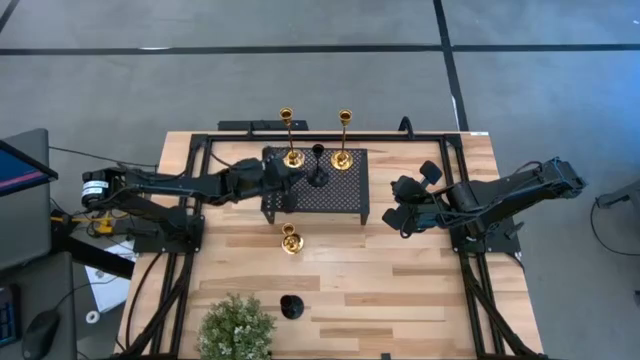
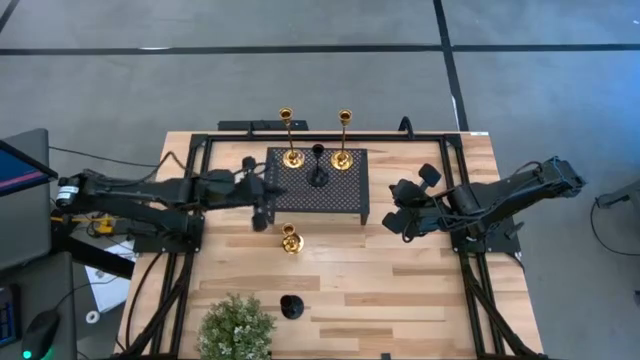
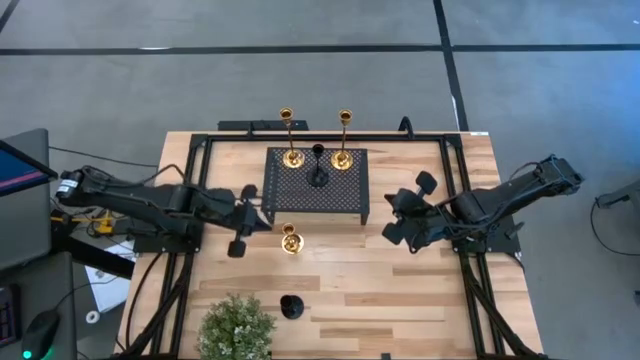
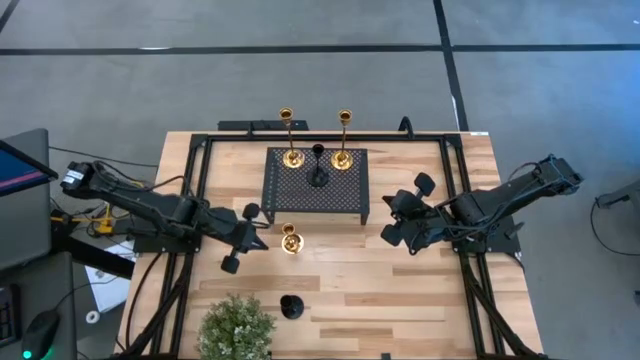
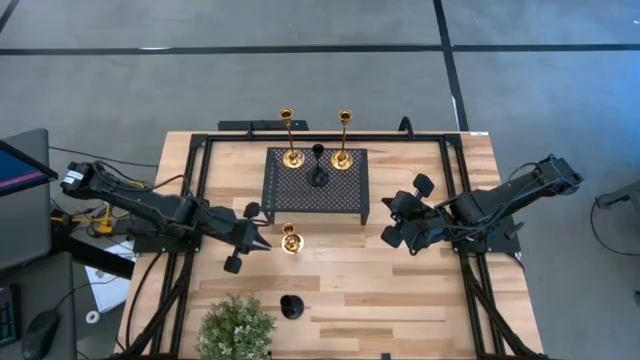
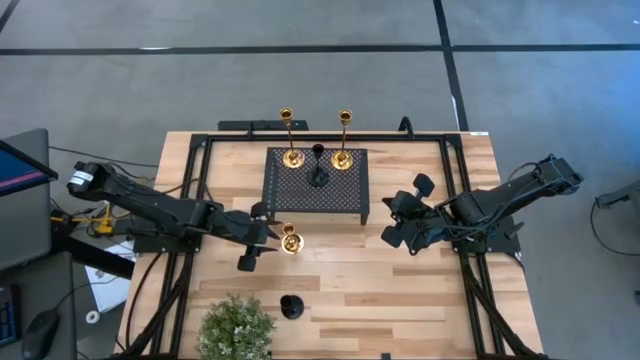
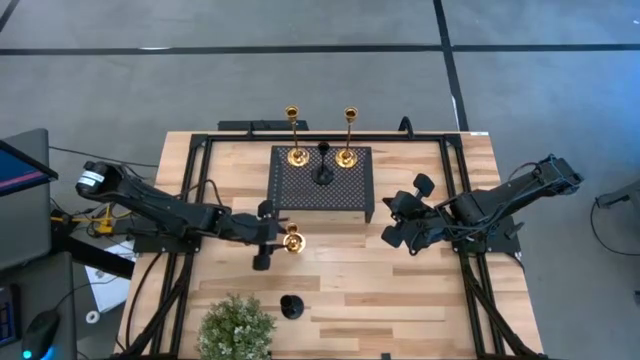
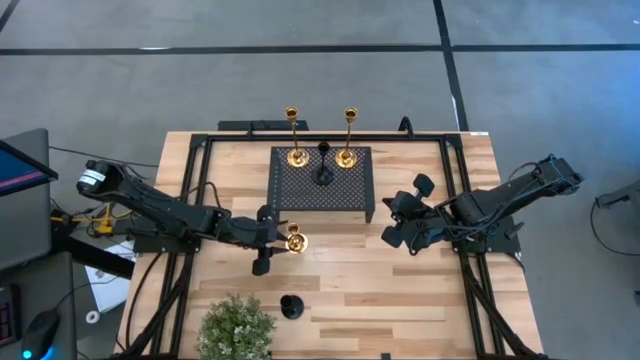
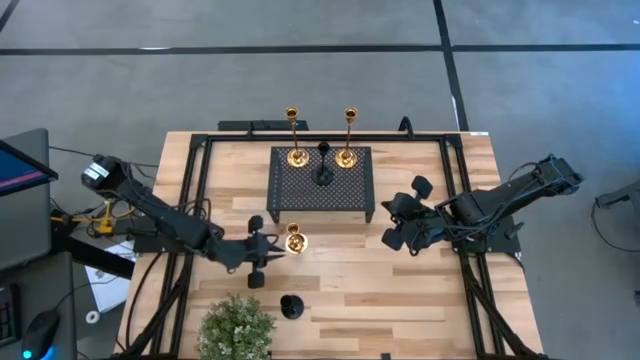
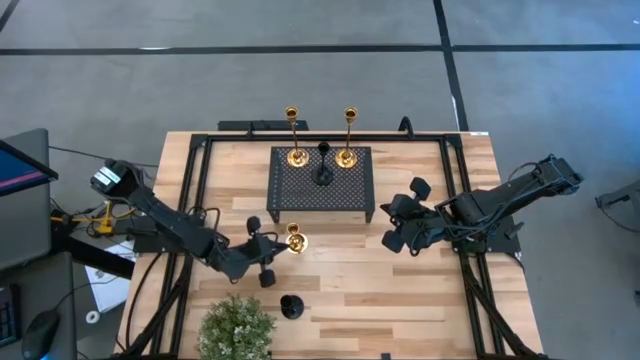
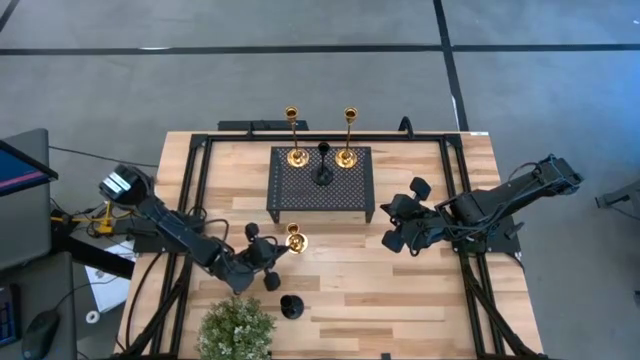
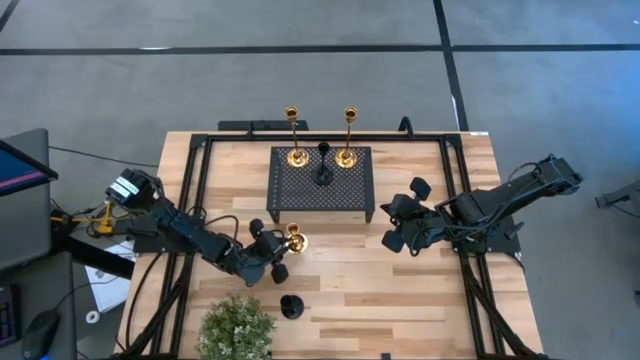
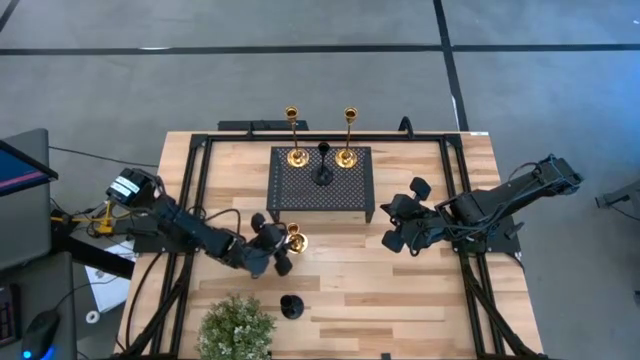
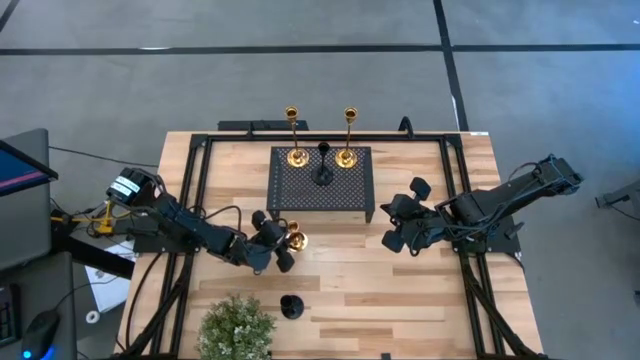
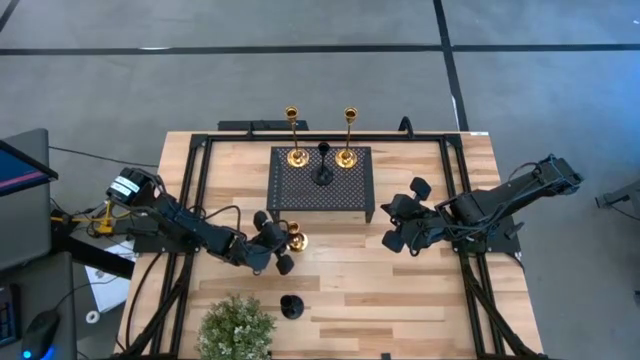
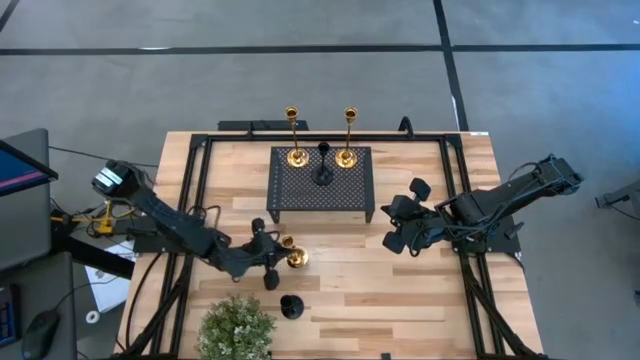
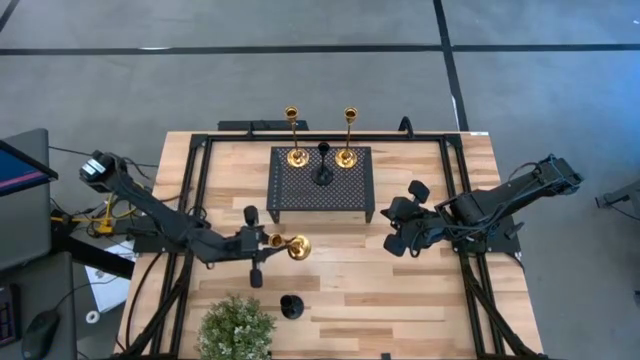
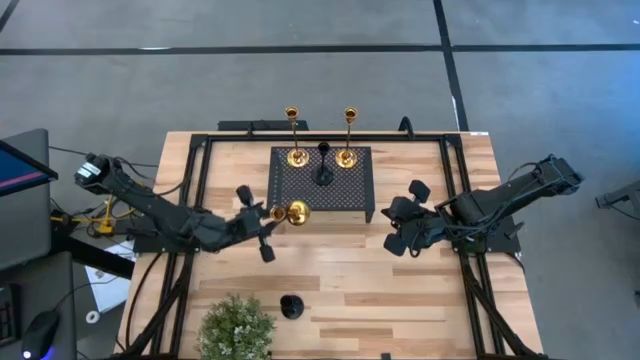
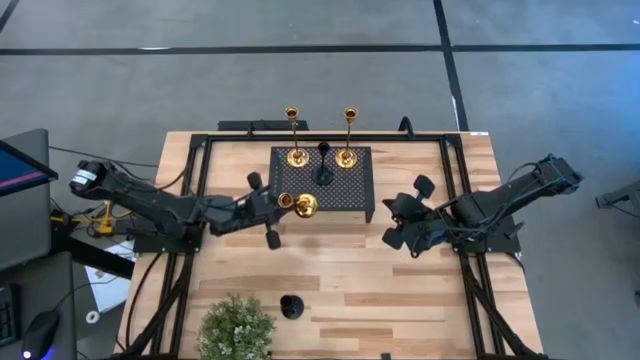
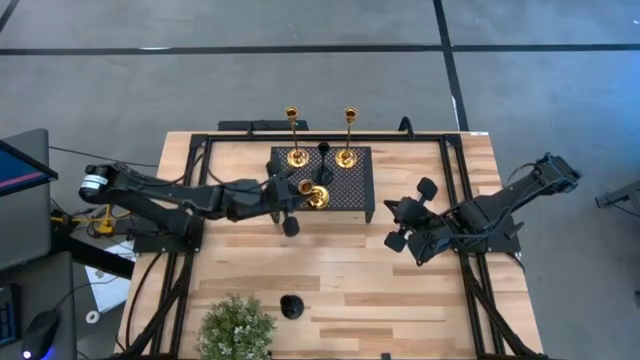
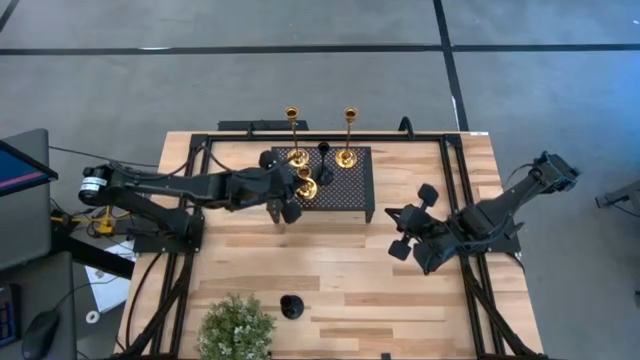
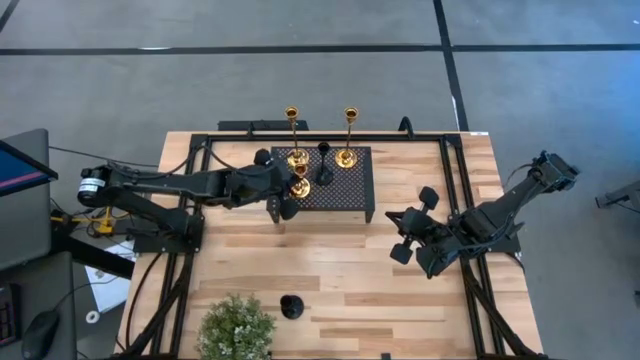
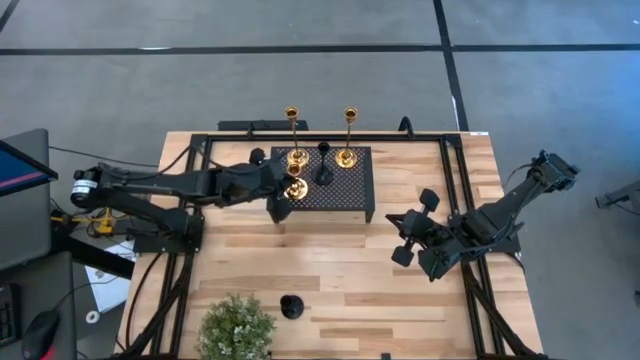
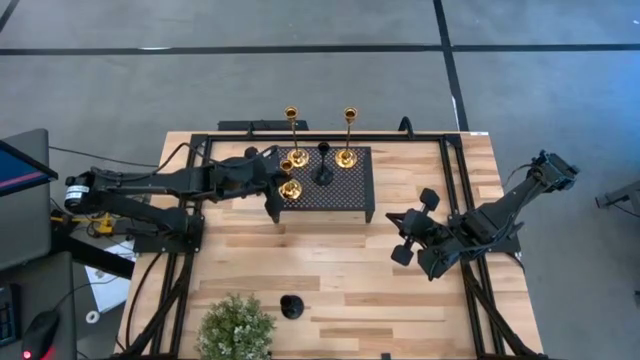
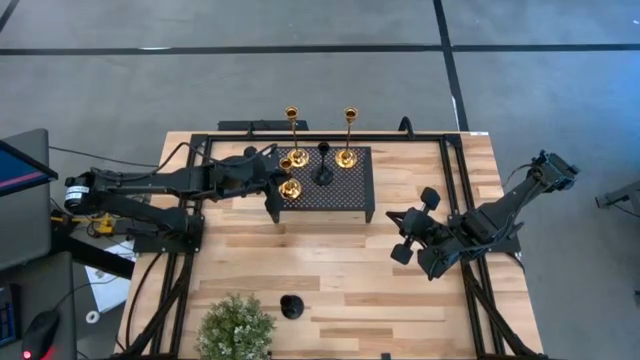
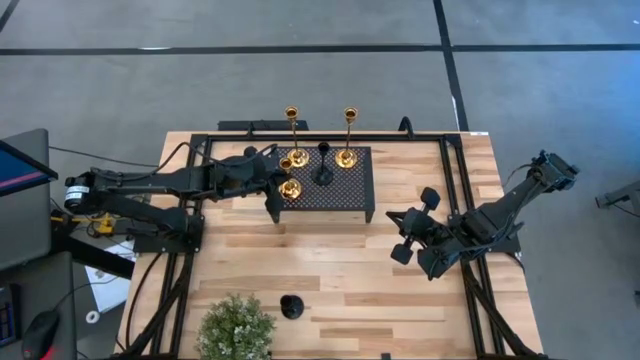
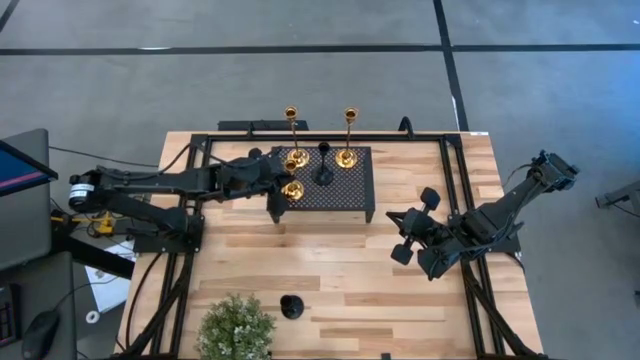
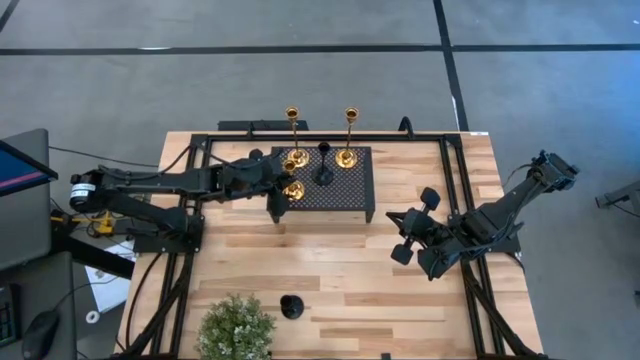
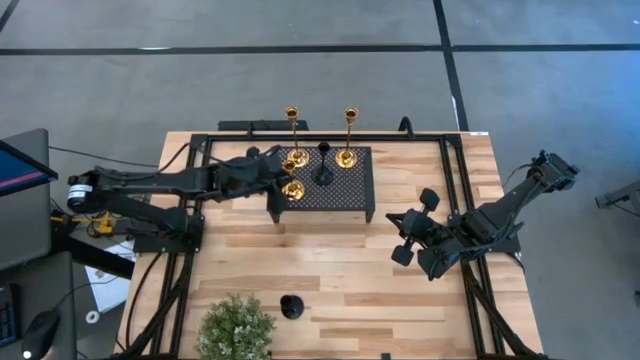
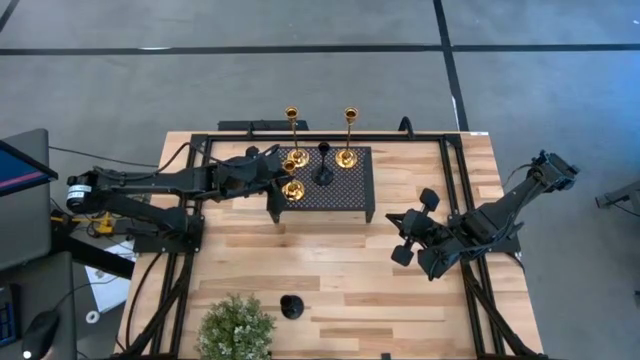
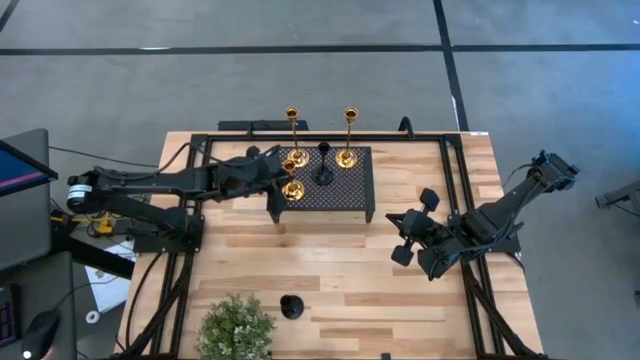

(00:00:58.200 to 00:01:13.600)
Task: Pick & Place candle stick holders
Put the small gold candle holder on the shelf

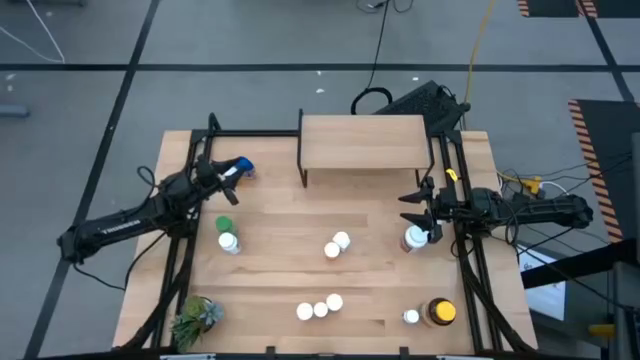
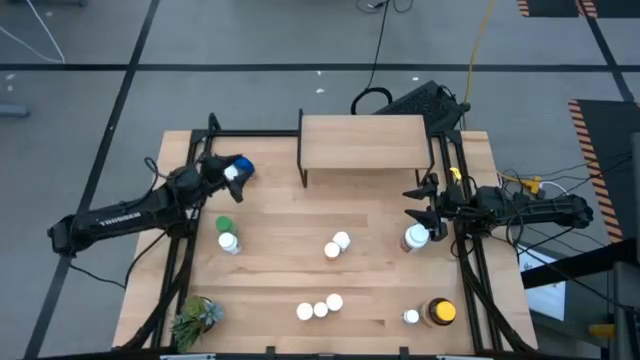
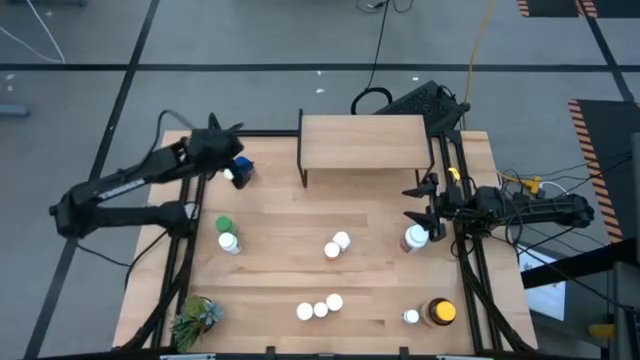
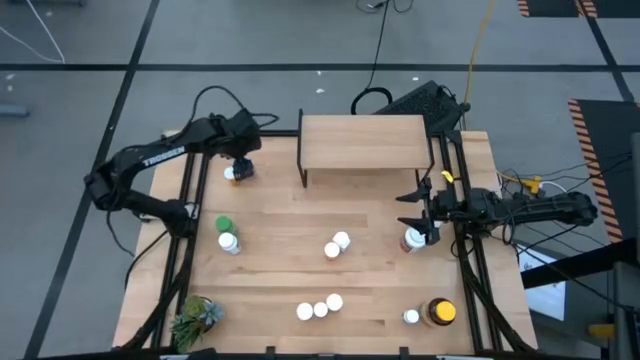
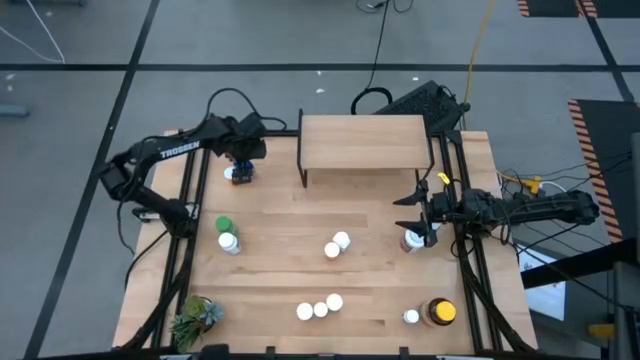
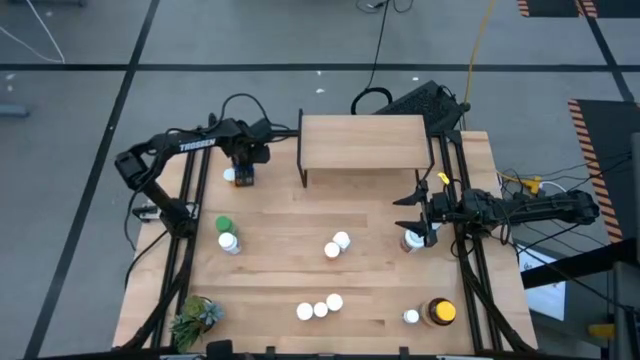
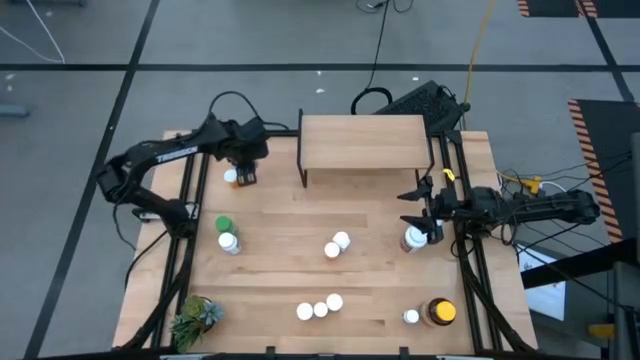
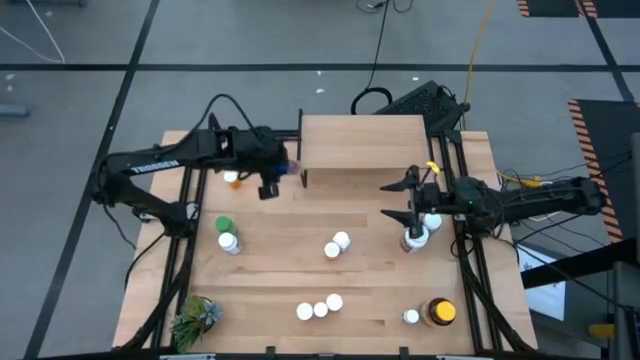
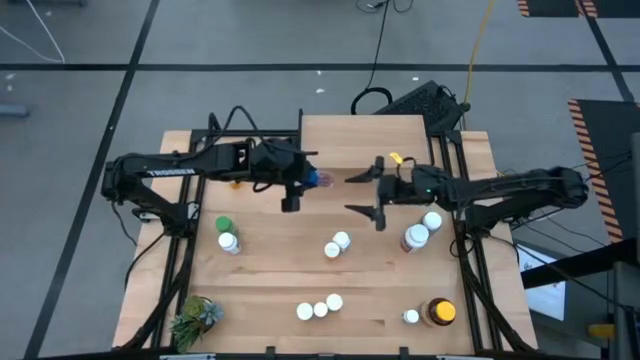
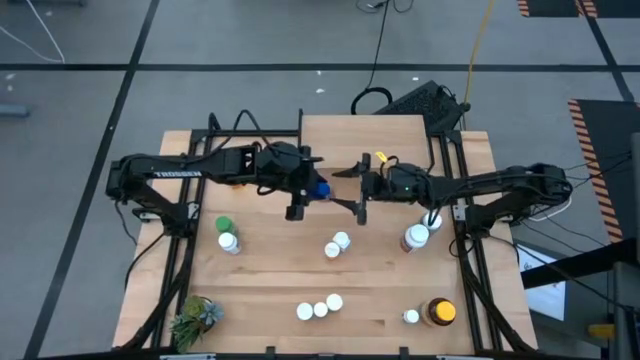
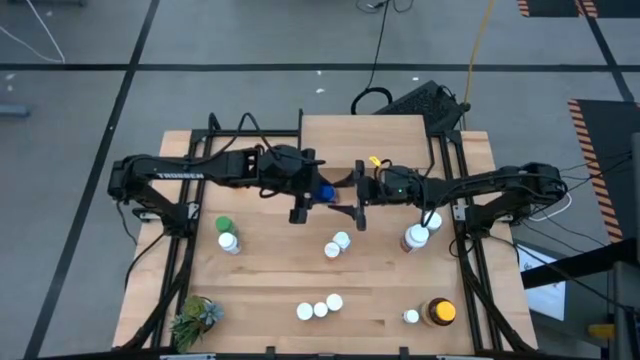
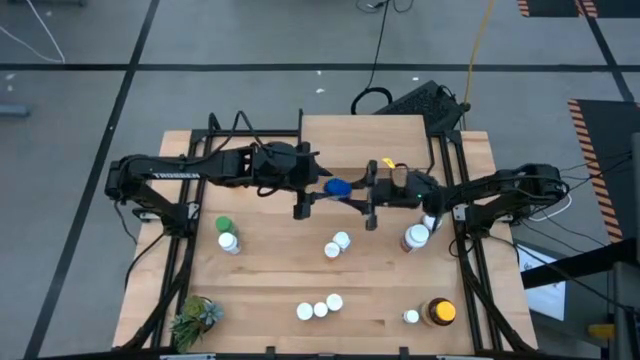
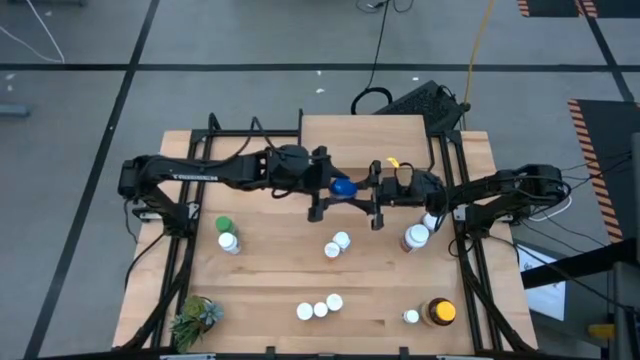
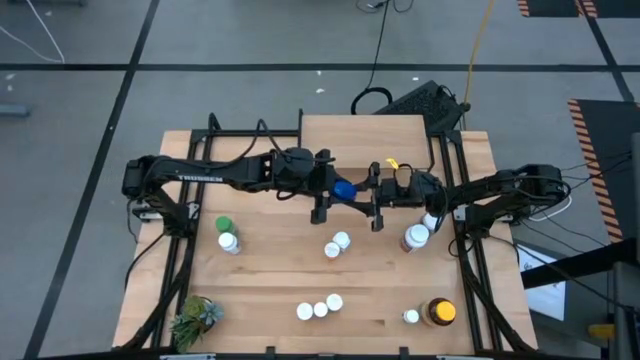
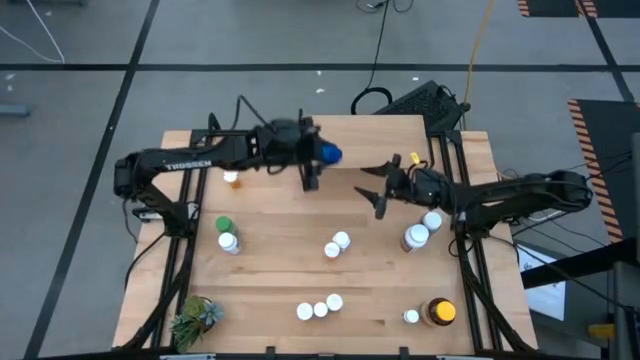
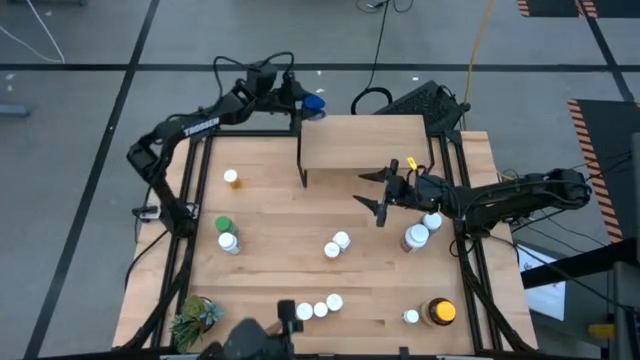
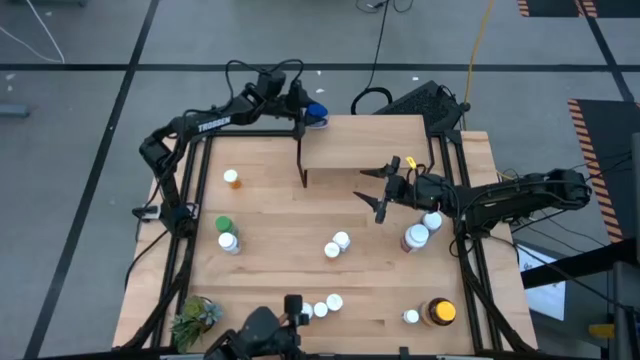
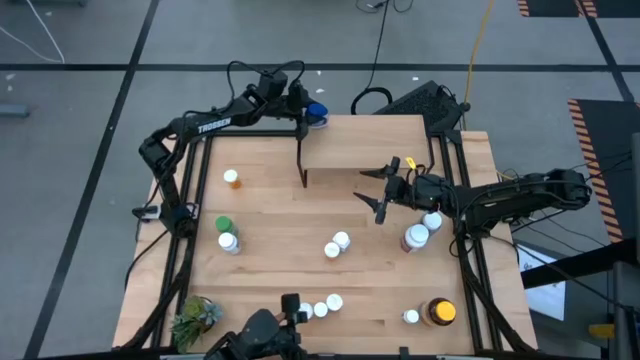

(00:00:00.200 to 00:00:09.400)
Task: Pick and place medicine bottles onto shelf by color
Put the blue bottle on the shelf
